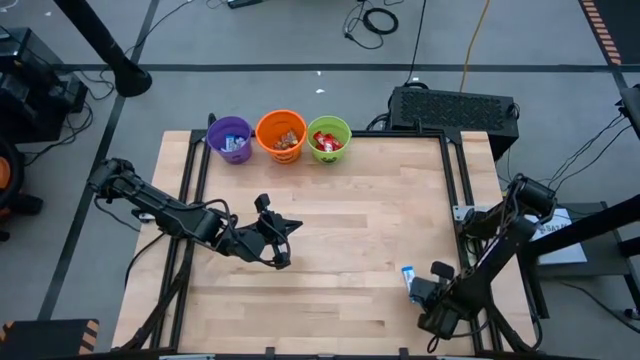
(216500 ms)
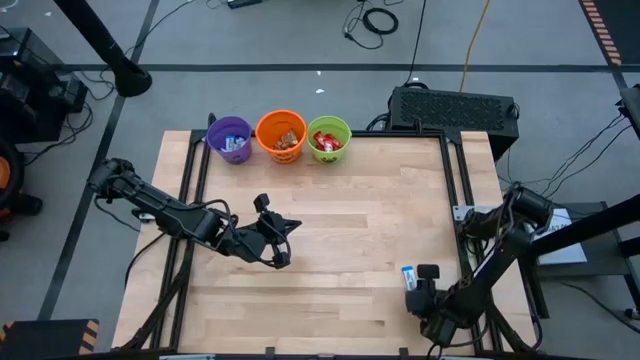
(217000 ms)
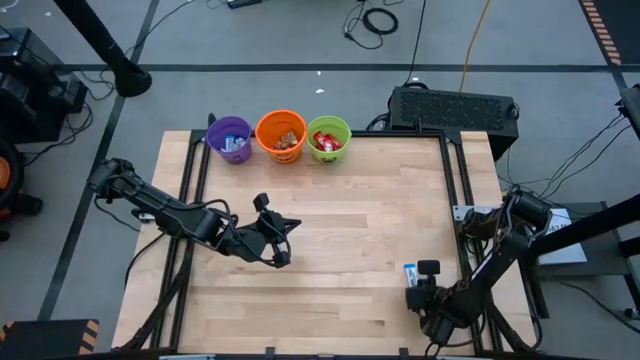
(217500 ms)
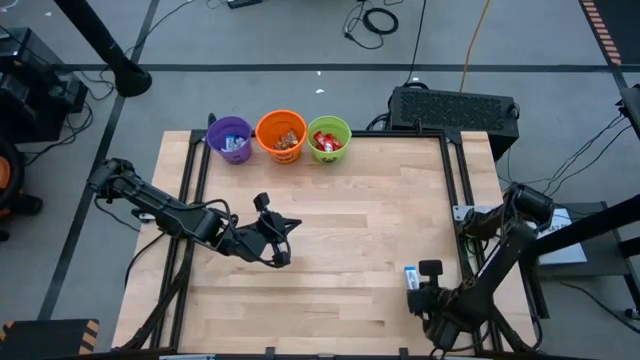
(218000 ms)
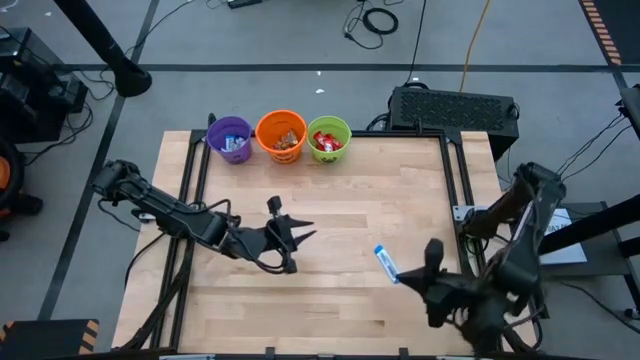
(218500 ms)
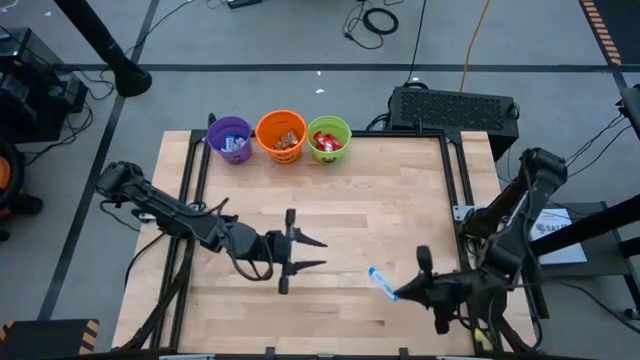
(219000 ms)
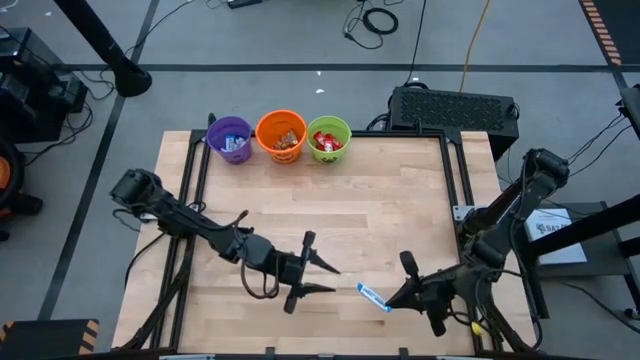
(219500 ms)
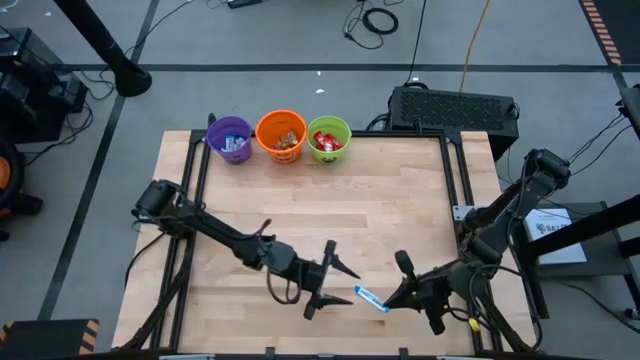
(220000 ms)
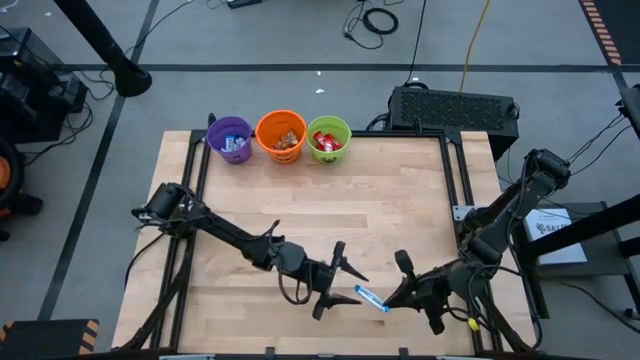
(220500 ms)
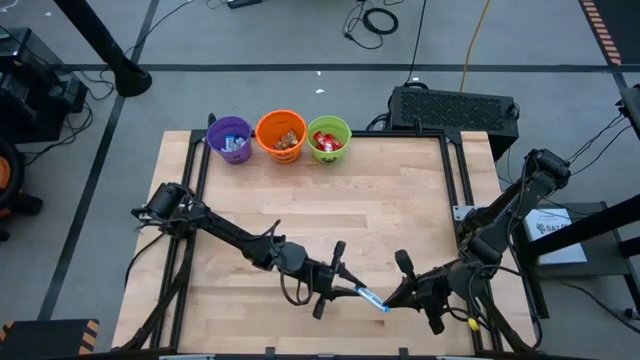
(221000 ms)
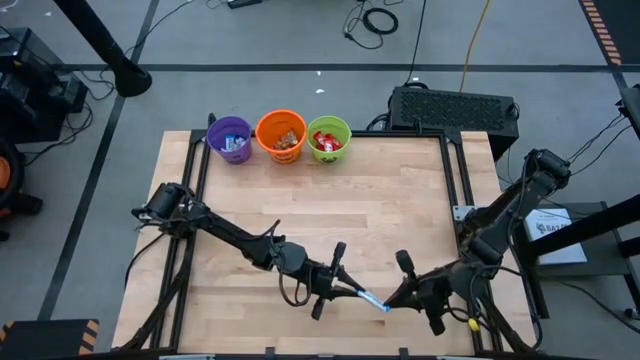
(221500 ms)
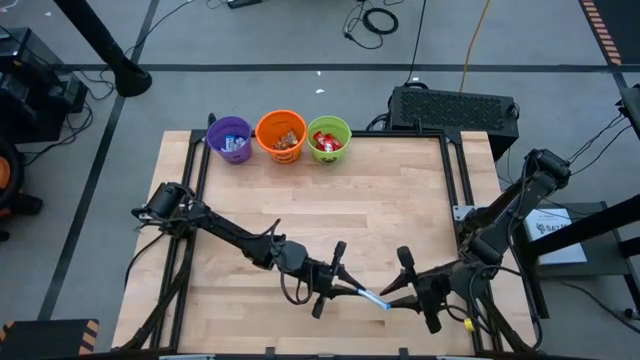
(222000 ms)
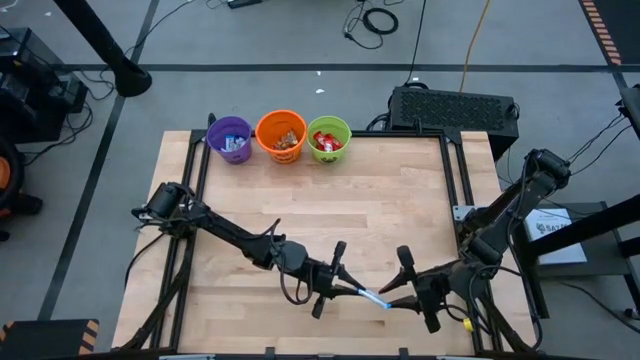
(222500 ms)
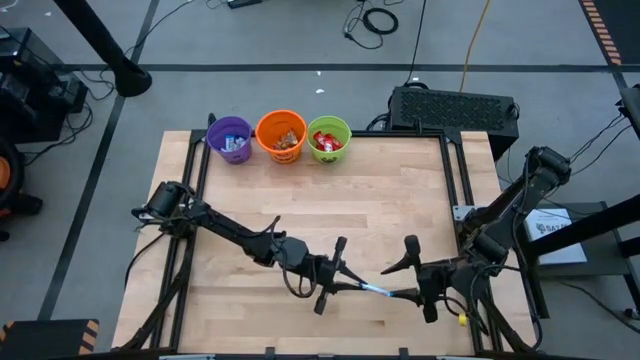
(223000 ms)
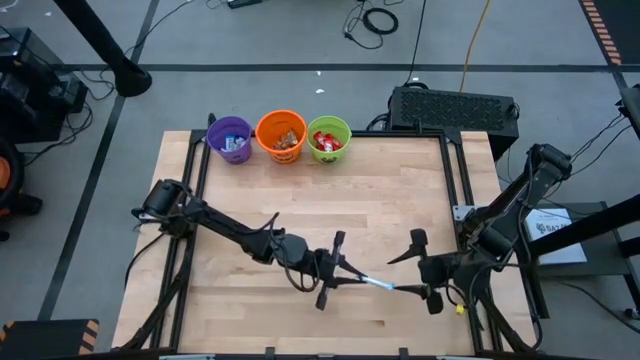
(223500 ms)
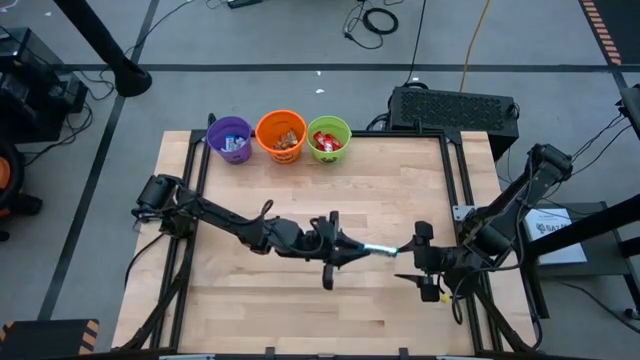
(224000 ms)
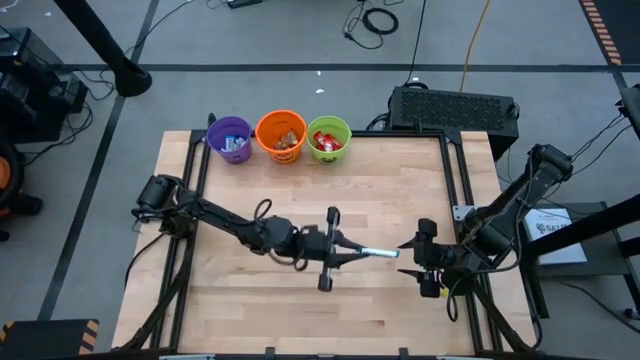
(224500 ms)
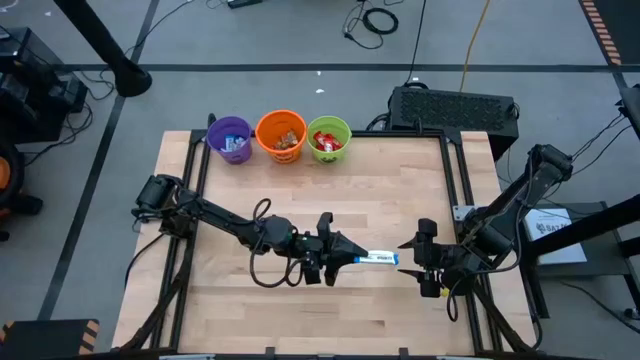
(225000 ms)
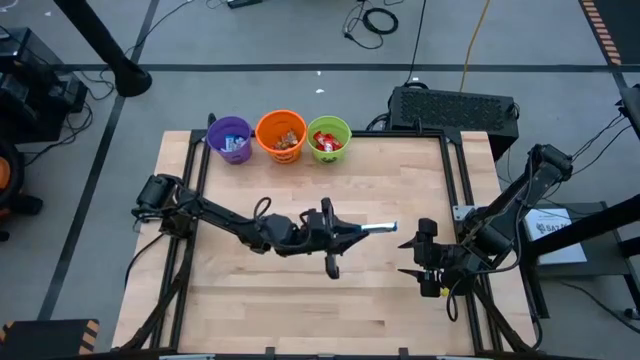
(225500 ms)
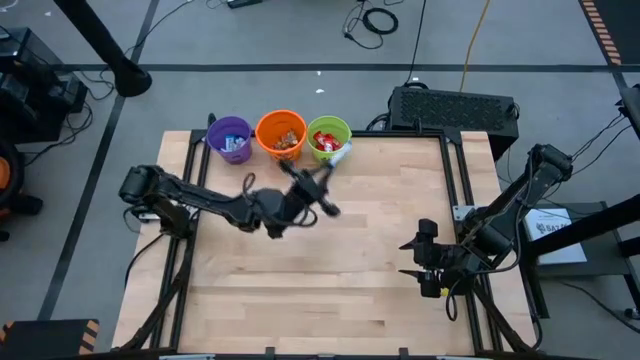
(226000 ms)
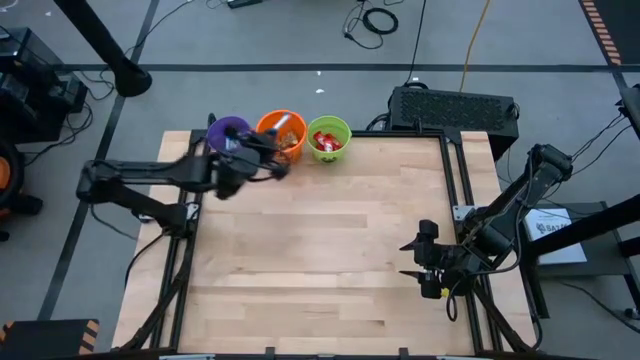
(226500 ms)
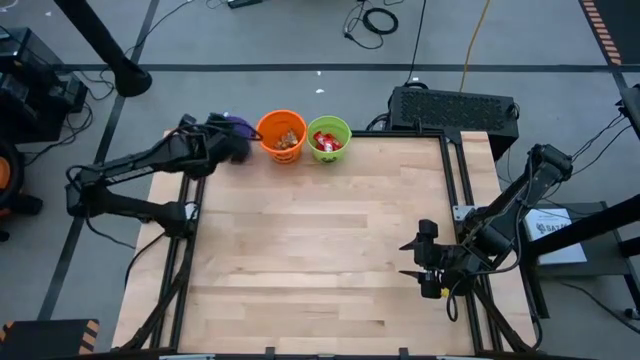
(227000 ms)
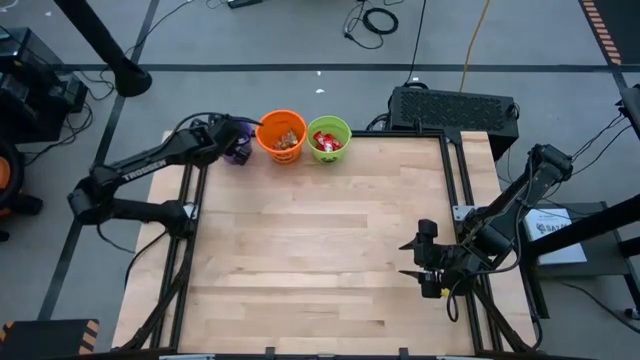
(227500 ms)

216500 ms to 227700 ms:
Task: Sort candy by brand, put in halloween buckets
Put the white chocolate bar into the violet bucket

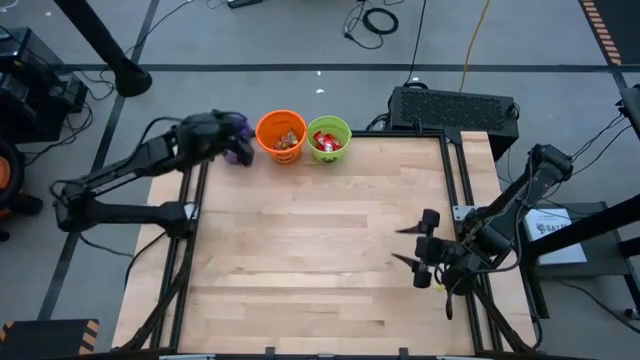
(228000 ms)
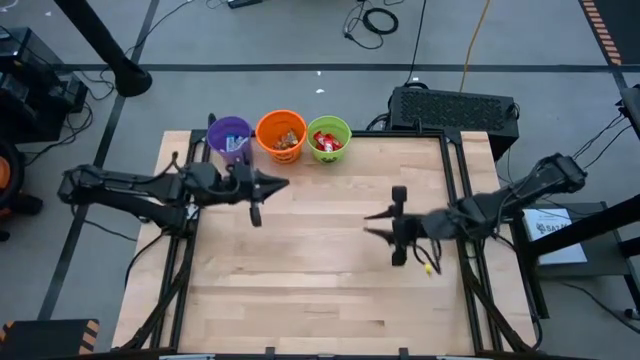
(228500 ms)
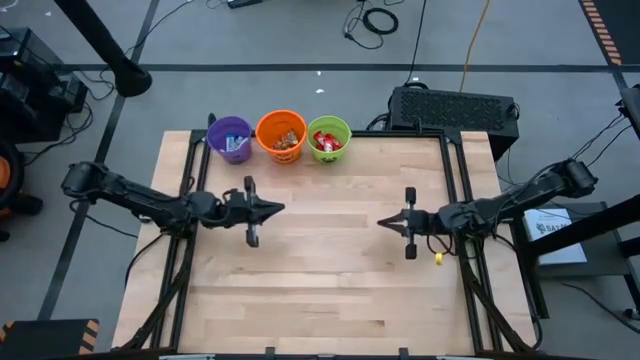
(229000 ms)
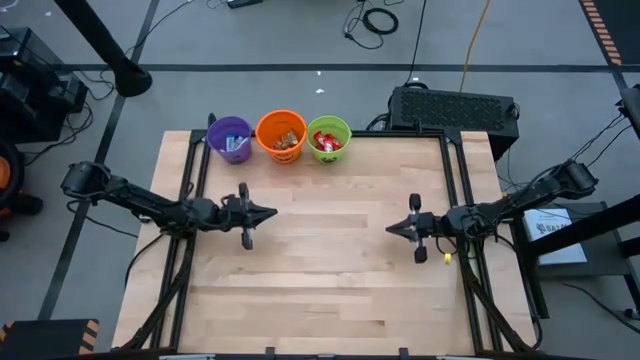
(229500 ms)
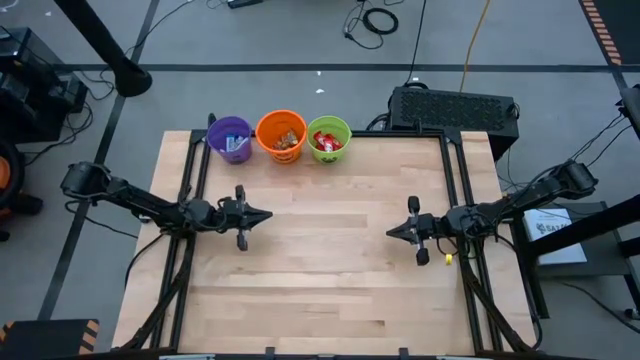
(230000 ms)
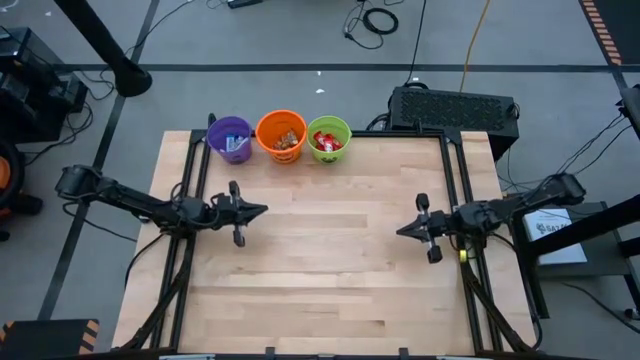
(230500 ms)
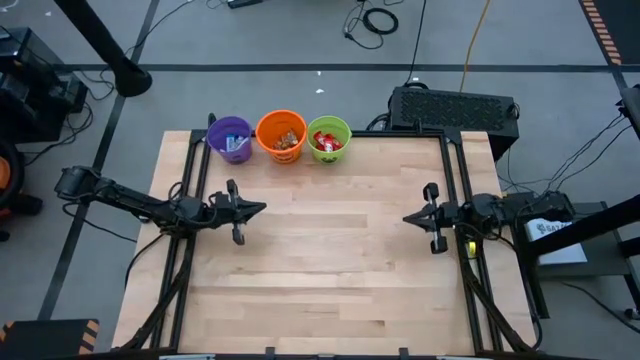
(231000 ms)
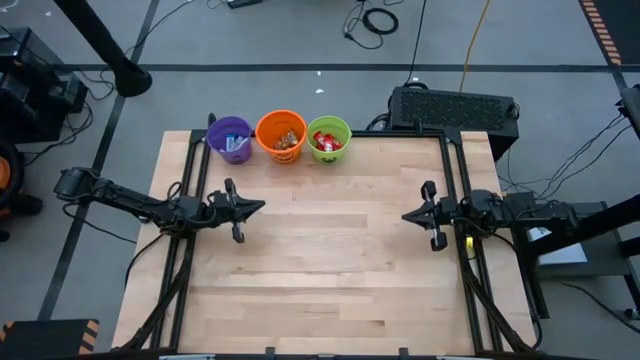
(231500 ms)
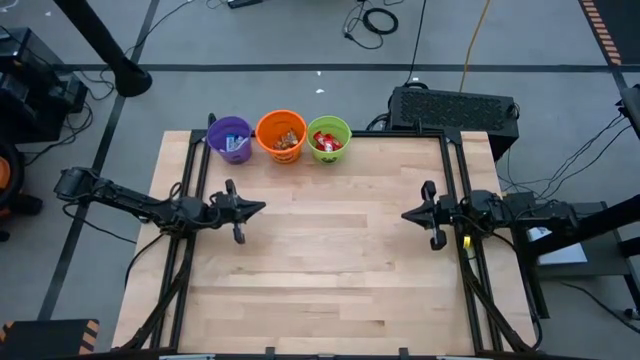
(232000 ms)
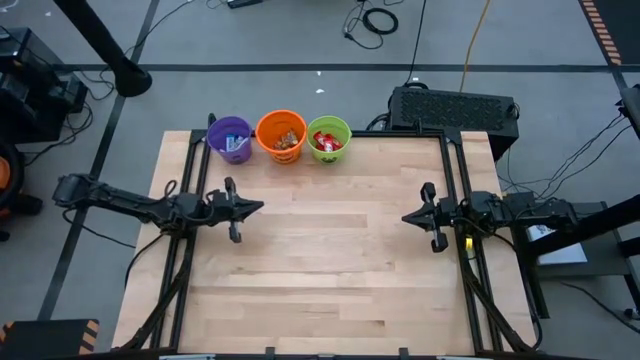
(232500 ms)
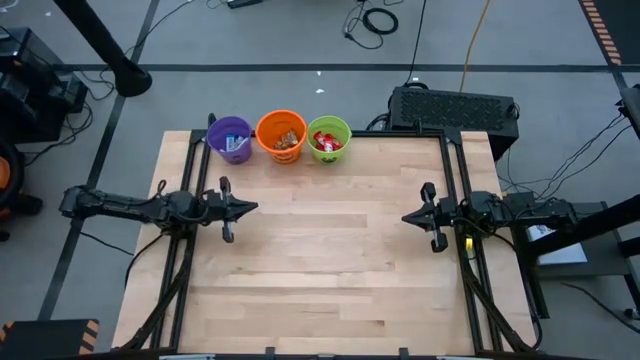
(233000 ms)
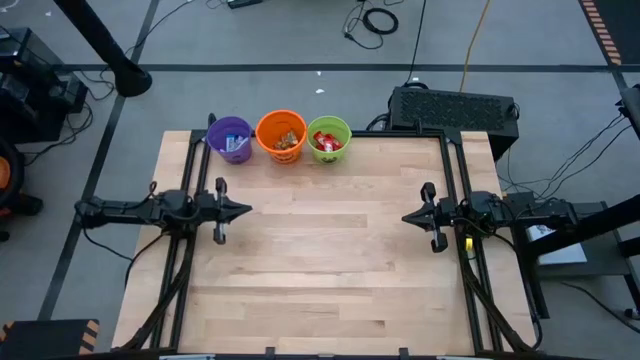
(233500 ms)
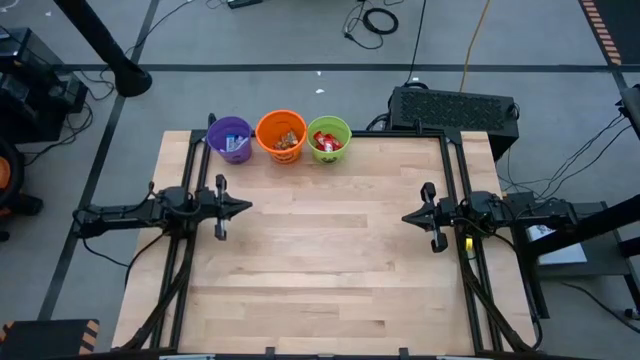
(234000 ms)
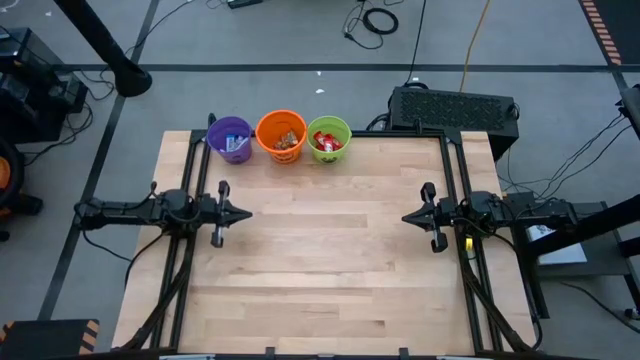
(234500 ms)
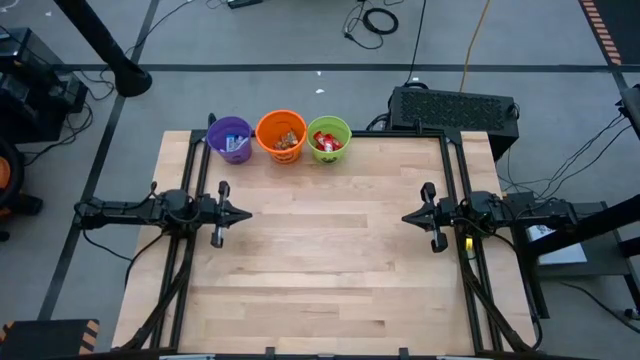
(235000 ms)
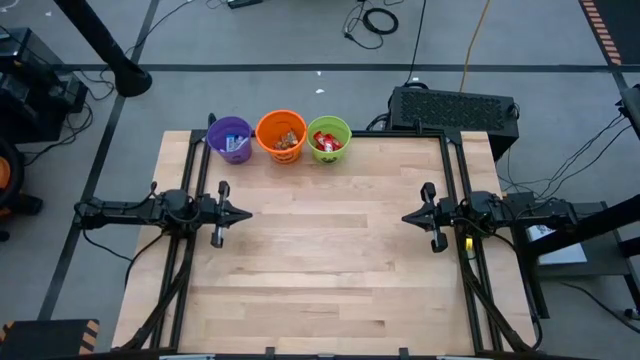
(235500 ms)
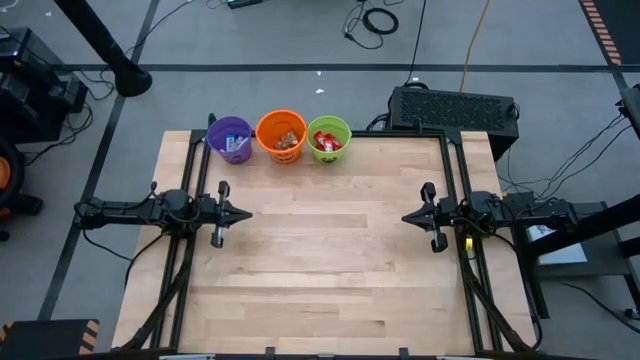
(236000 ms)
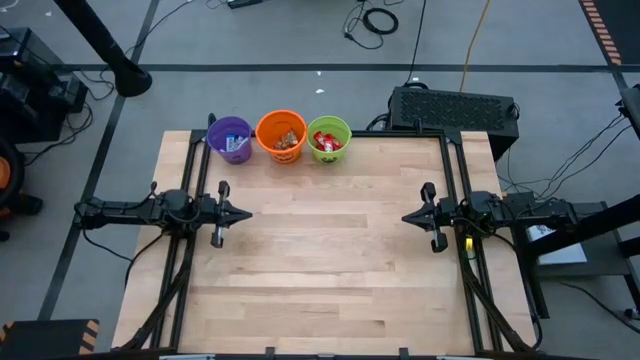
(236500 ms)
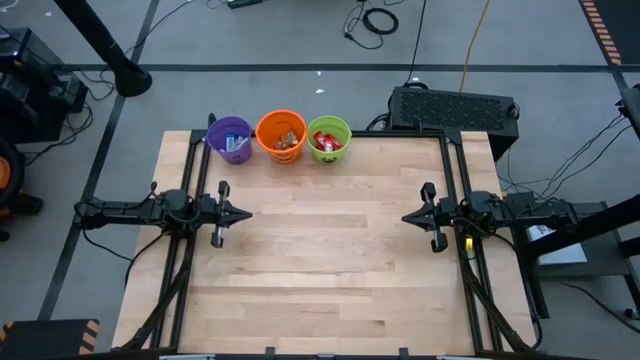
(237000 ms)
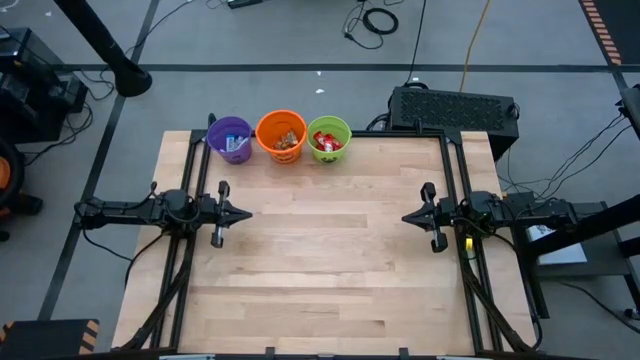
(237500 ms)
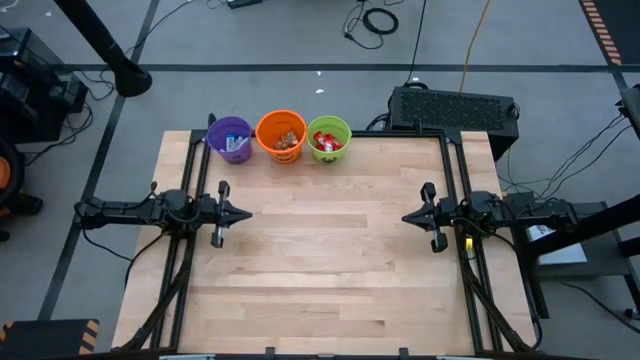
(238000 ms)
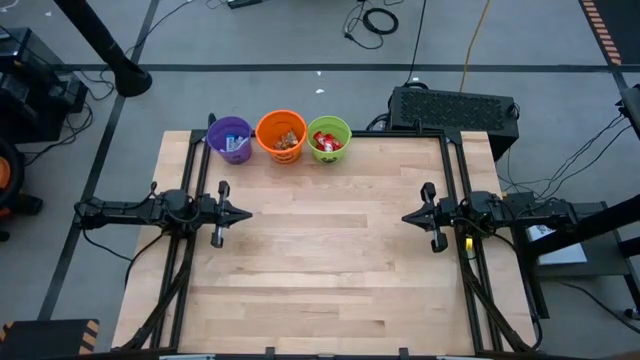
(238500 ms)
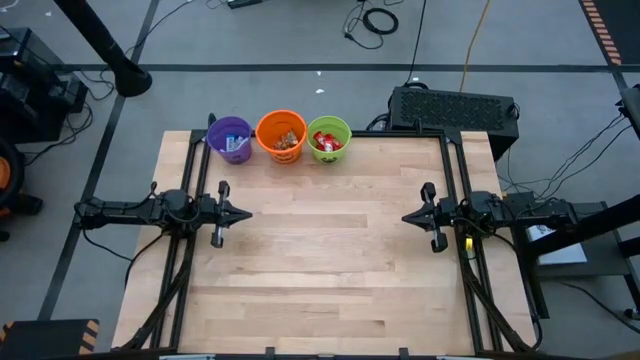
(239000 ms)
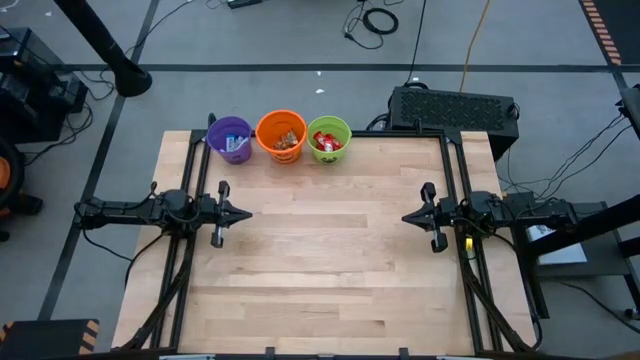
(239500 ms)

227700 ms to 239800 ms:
Return to Home Position
